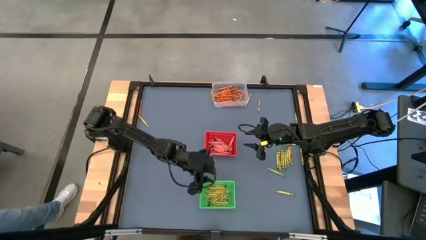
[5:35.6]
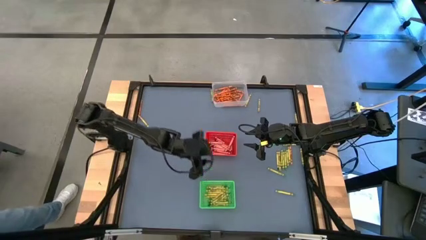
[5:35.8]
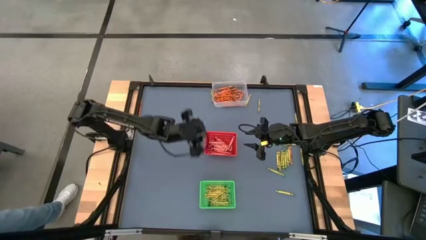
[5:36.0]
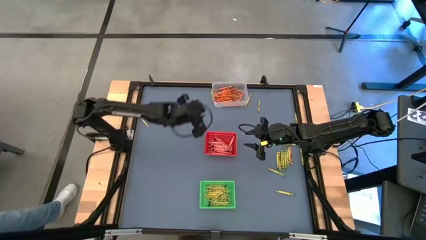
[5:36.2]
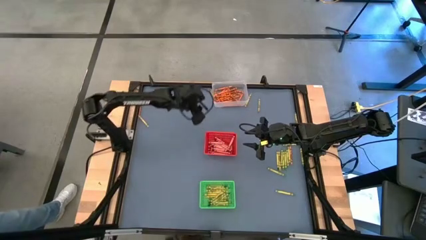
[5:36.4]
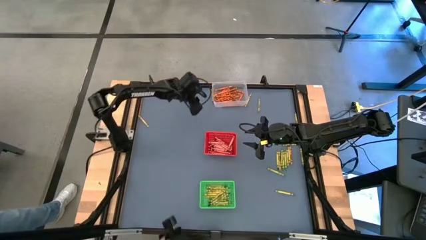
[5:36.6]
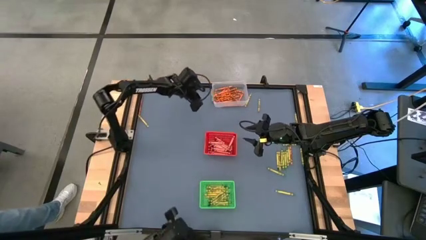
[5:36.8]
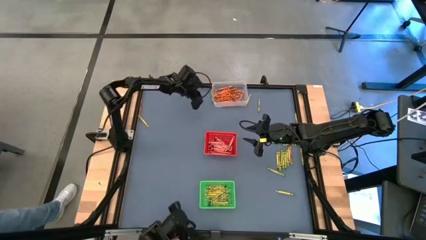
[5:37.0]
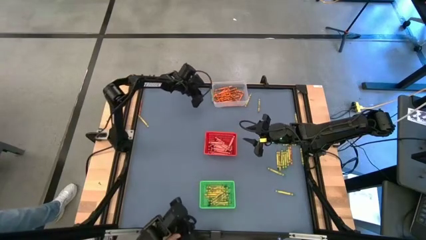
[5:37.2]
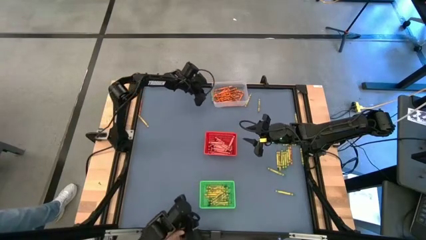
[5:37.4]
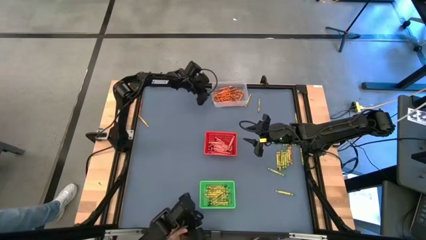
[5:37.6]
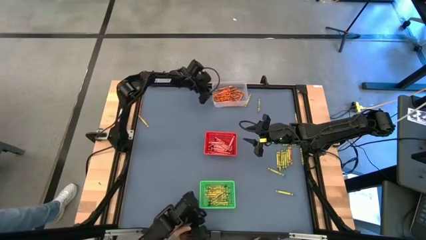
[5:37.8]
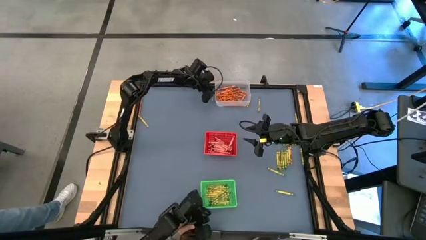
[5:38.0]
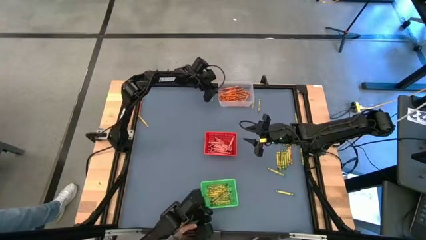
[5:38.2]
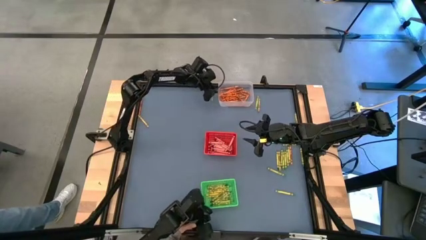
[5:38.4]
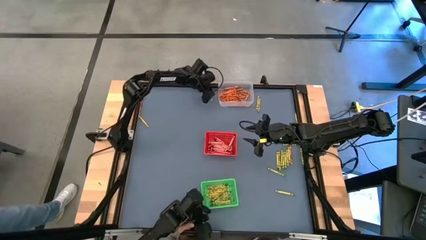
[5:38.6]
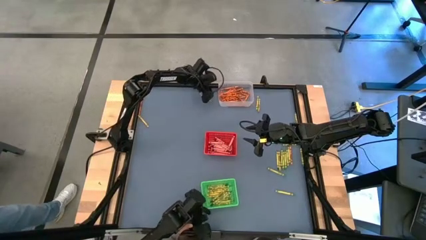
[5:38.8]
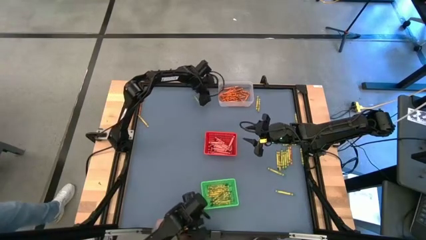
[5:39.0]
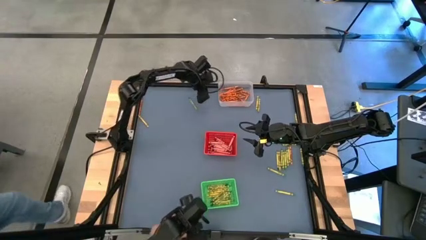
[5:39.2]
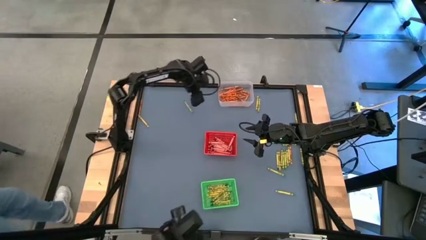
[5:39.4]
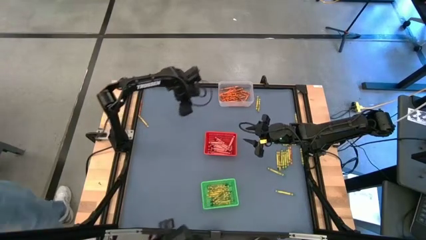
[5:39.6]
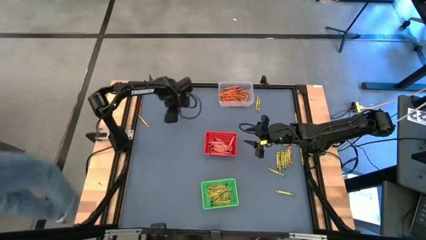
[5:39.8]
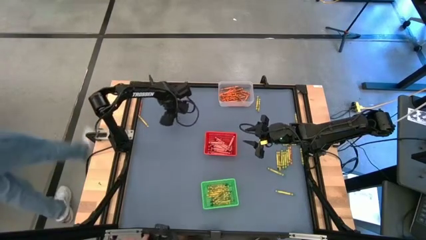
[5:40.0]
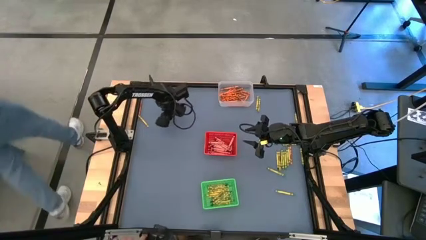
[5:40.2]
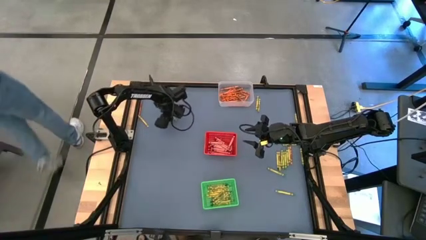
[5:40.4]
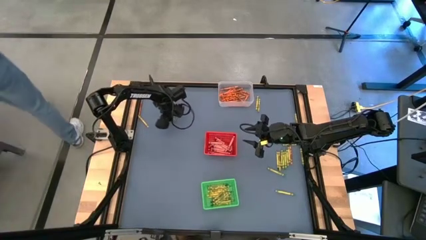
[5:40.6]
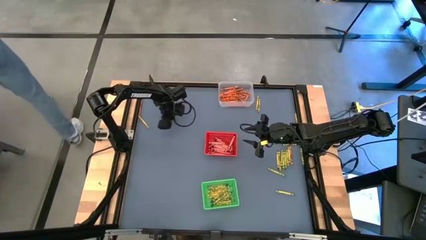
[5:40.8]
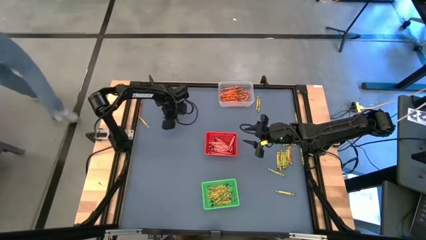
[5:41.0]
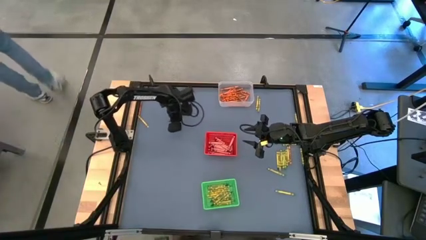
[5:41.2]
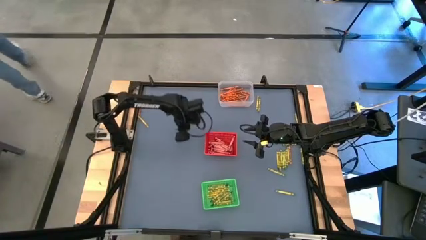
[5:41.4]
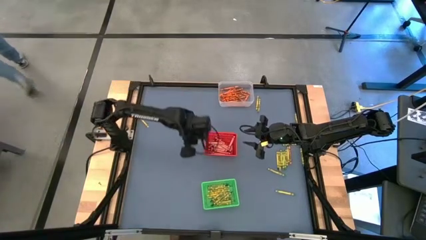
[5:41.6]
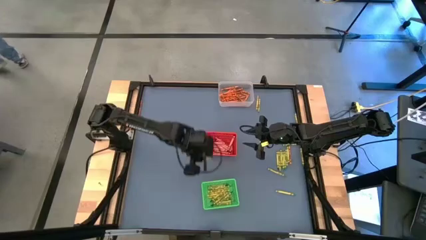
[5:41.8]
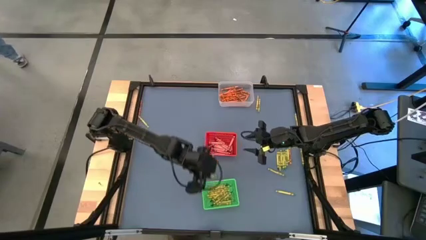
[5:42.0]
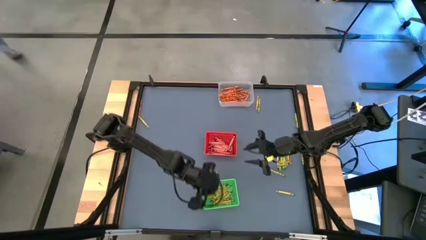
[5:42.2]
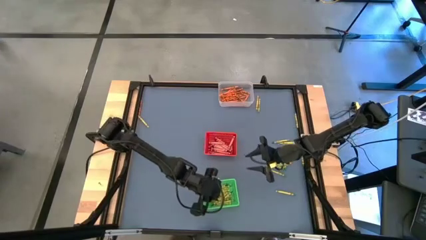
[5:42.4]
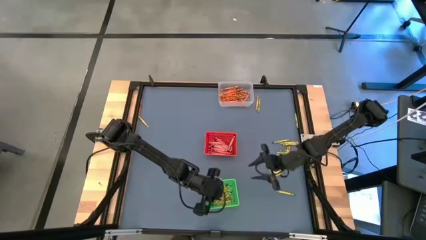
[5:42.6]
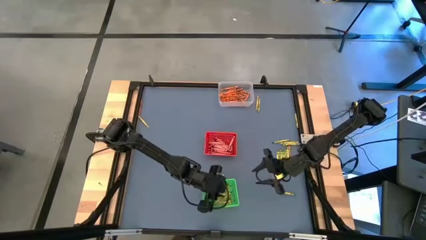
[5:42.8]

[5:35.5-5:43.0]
Task: Sort crayons
Put the green crayon into the green bin

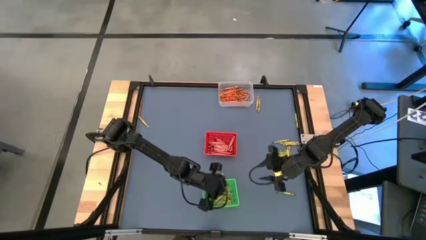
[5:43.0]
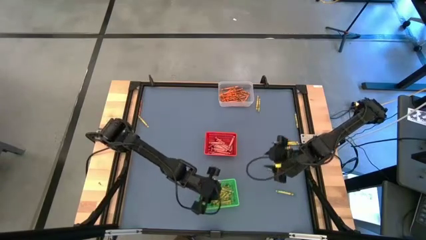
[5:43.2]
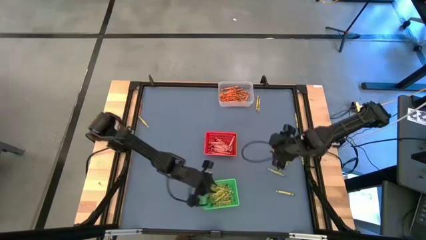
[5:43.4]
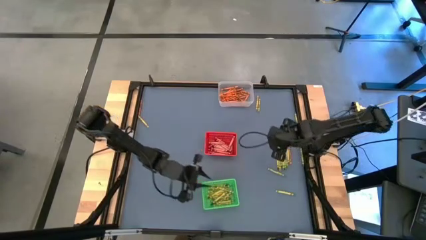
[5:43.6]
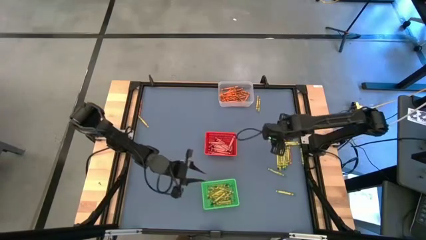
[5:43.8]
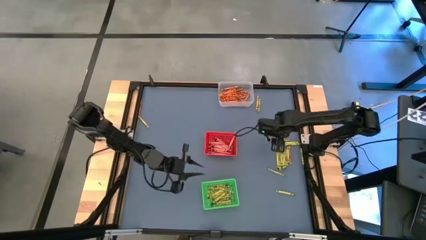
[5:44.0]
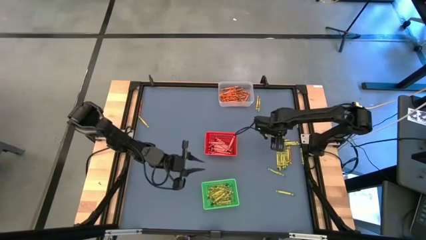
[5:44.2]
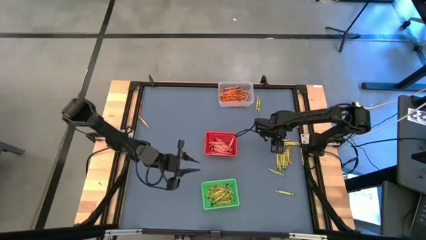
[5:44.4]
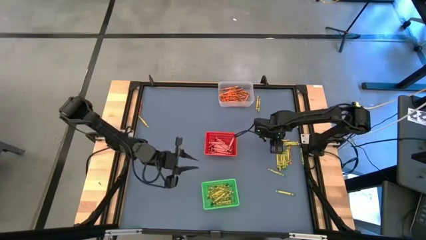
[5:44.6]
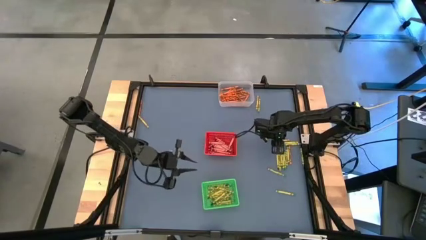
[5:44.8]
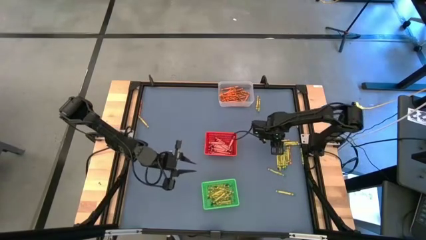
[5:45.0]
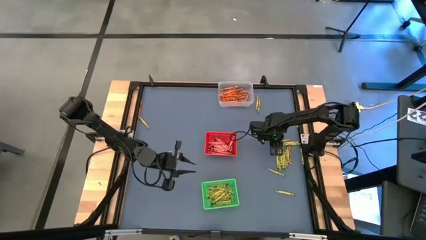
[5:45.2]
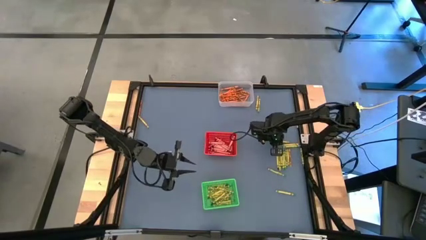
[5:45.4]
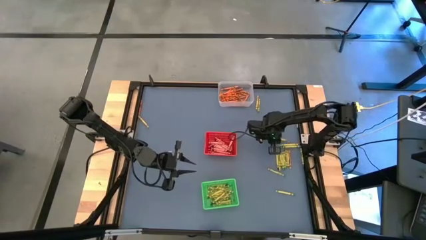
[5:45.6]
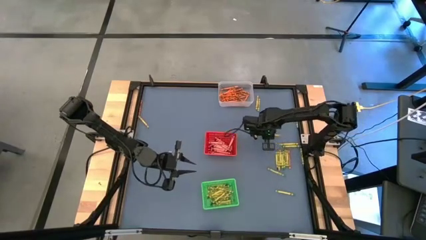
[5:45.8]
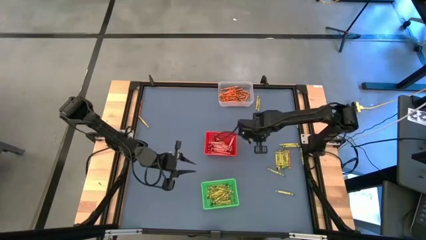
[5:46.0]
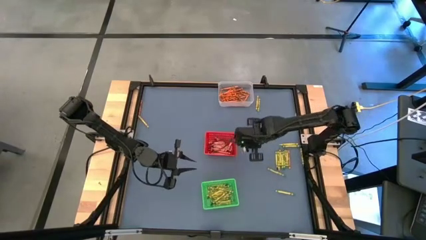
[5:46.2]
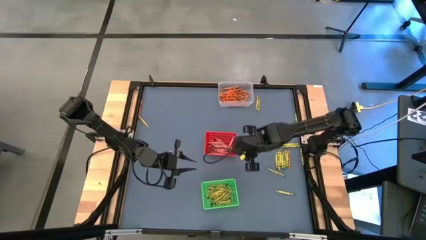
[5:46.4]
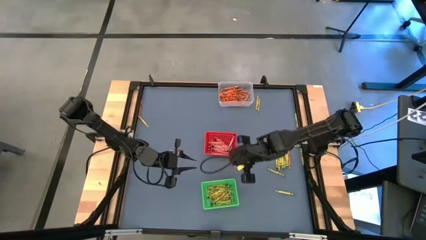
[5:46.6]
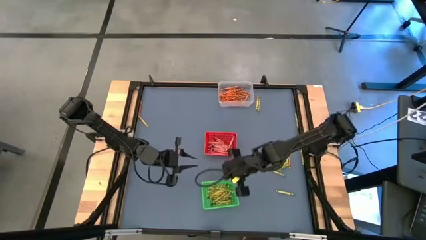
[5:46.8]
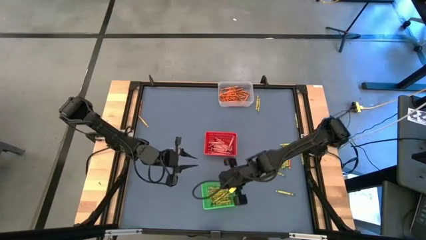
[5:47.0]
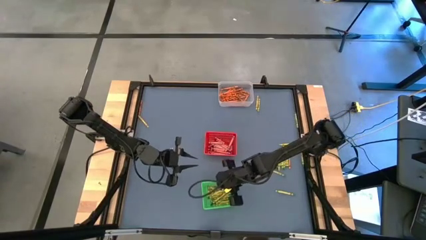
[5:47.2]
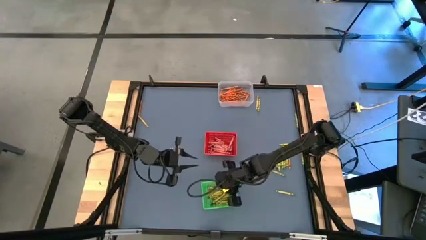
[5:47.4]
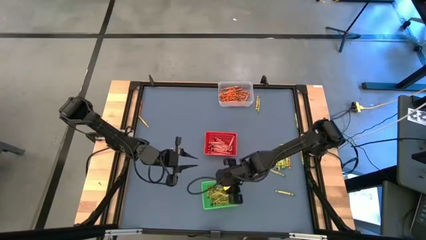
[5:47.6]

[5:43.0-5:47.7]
Put the green crayon into the green bin

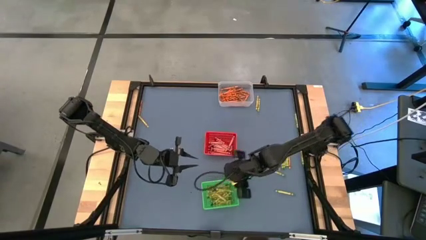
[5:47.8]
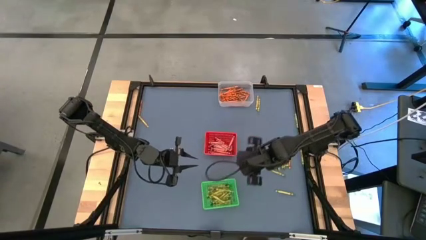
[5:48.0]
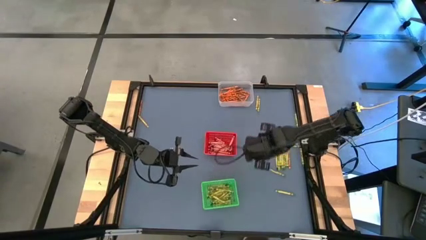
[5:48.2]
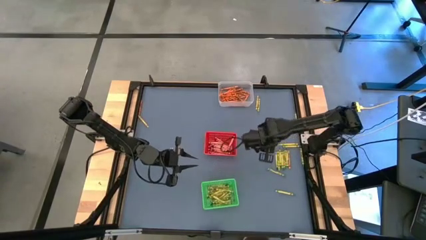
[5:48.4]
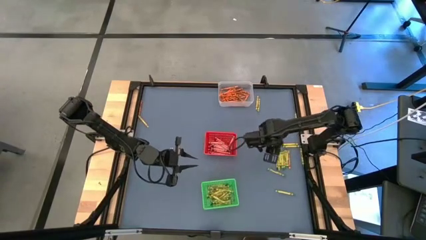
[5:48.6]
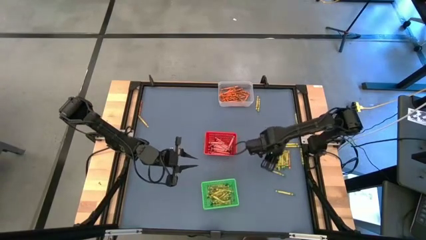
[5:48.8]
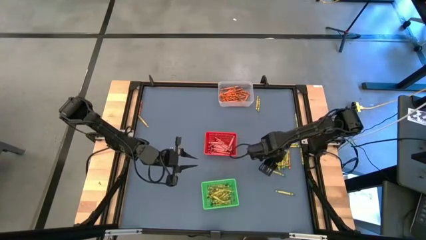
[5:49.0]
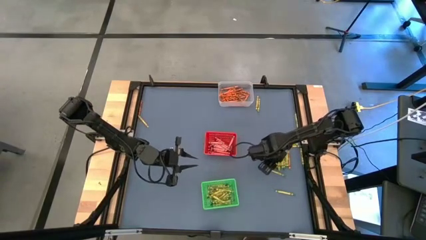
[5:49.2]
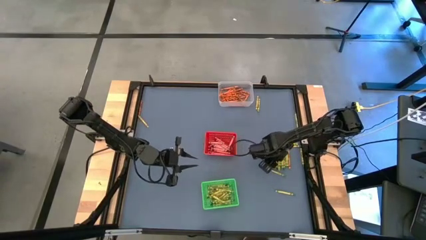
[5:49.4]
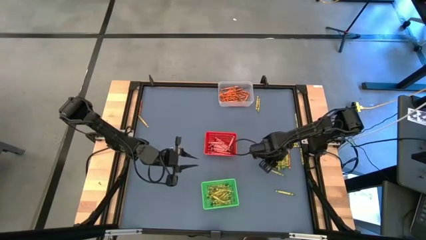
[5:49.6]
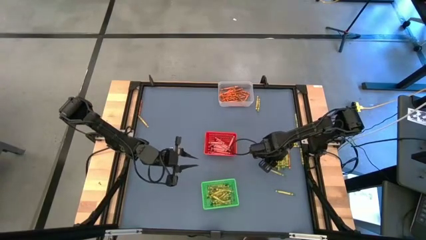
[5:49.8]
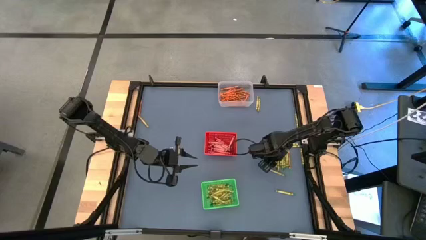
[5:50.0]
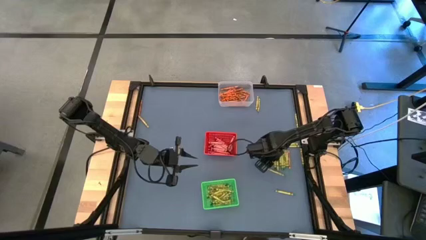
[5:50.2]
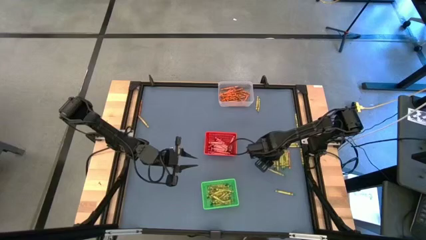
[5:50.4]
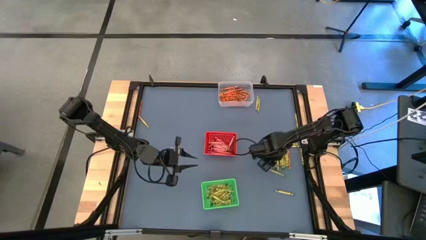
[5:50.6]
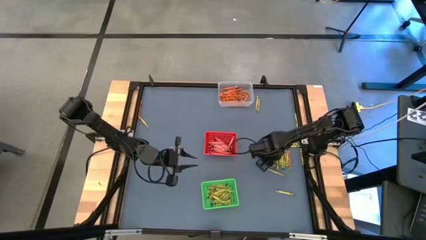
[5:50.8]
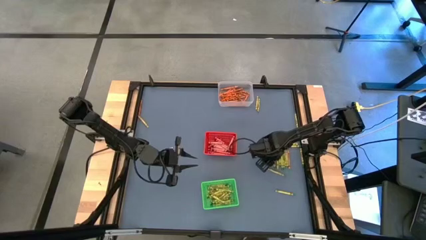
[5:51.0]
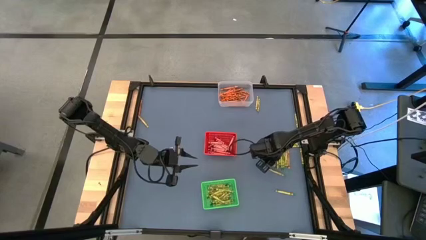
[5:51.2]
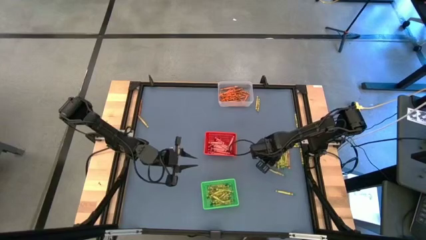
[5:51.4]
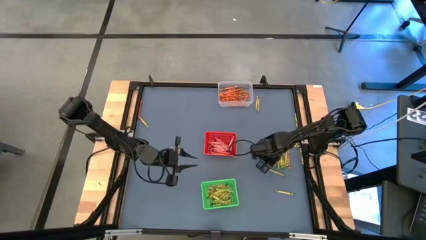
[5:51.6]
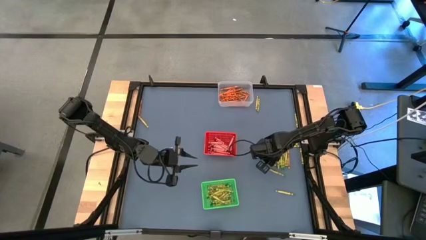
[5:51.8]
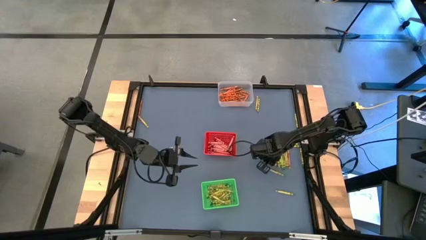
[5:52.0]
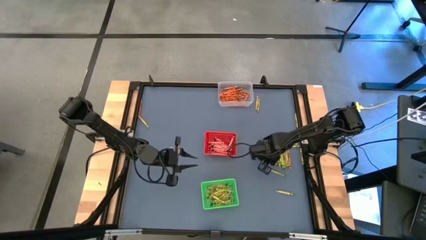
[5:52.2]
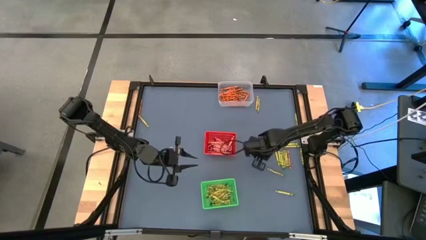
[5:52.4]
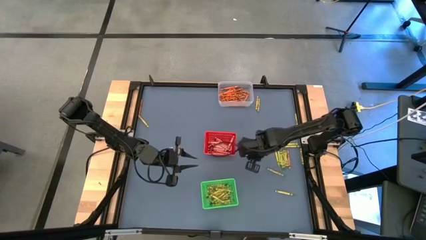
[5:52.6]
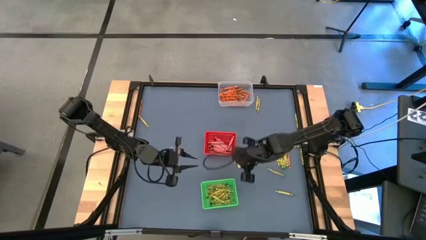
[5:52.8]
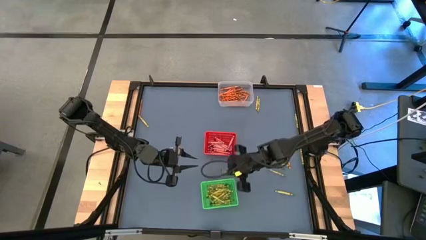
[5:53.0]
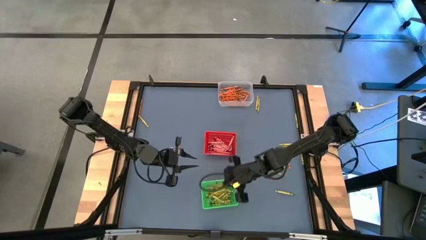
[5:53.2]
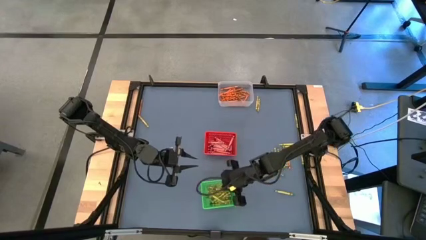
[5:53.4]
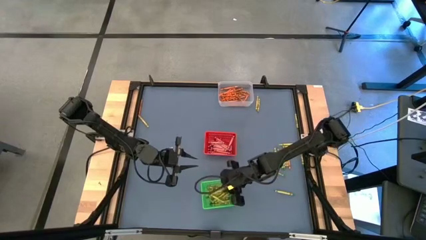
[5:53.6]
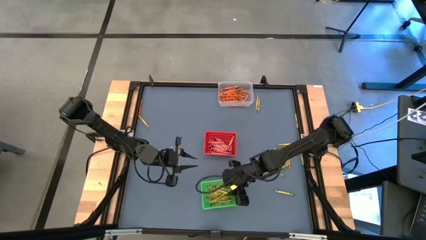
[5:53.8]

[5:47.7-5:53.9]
Put the green crayon into the green bin
